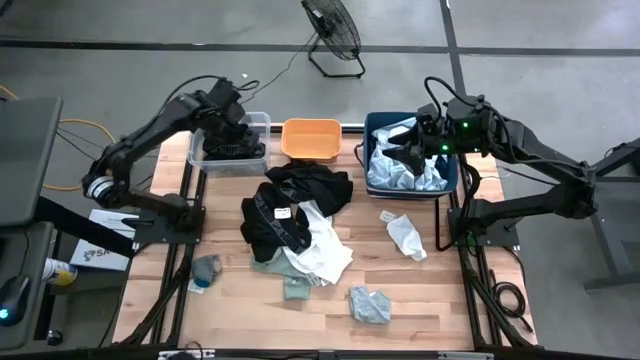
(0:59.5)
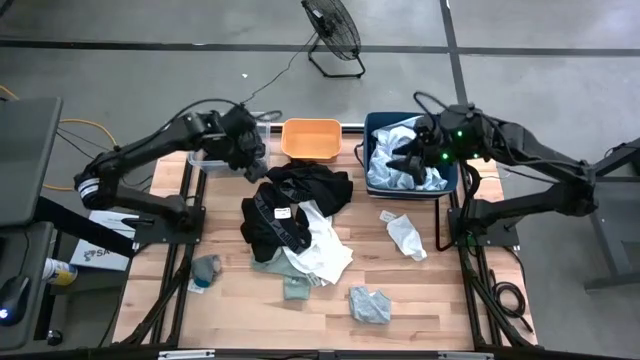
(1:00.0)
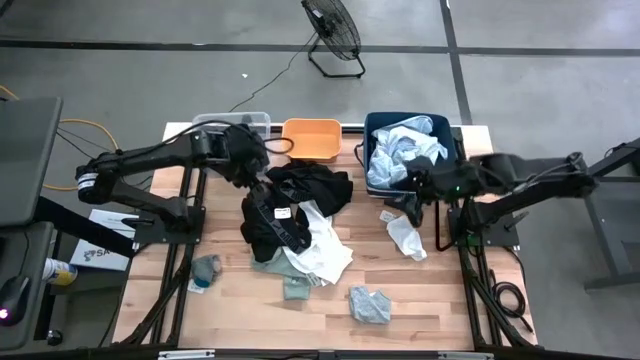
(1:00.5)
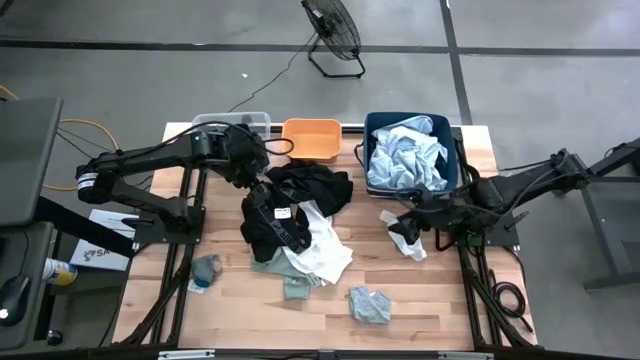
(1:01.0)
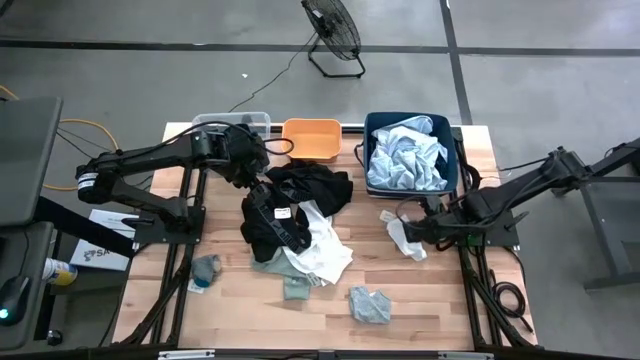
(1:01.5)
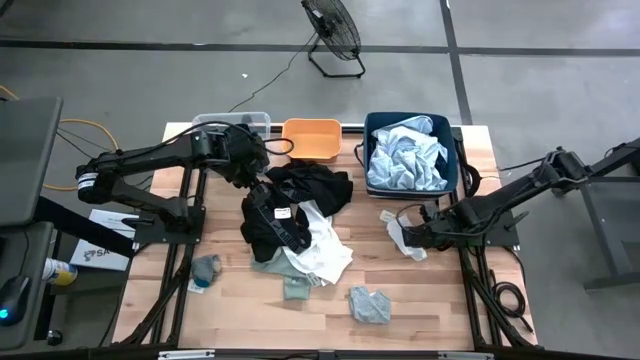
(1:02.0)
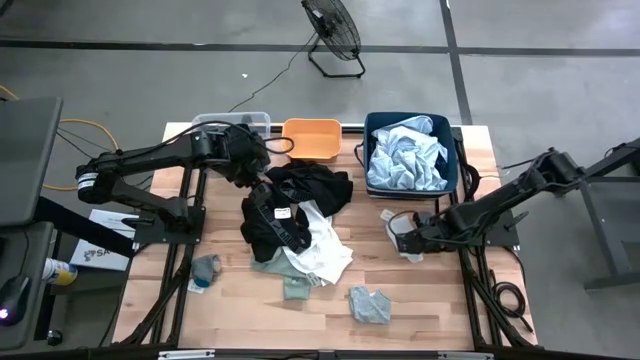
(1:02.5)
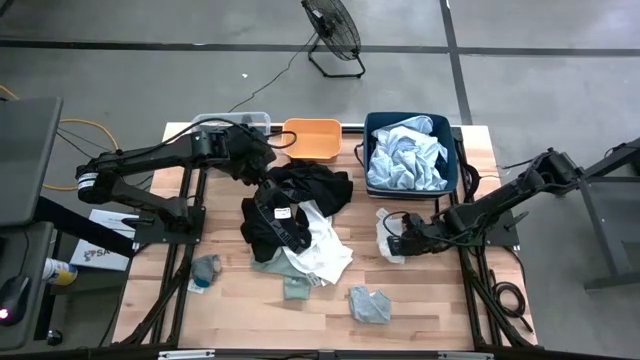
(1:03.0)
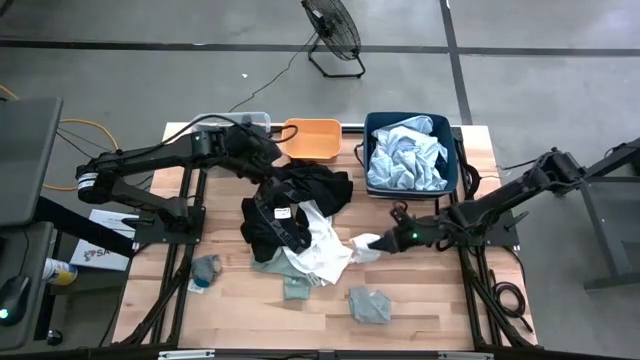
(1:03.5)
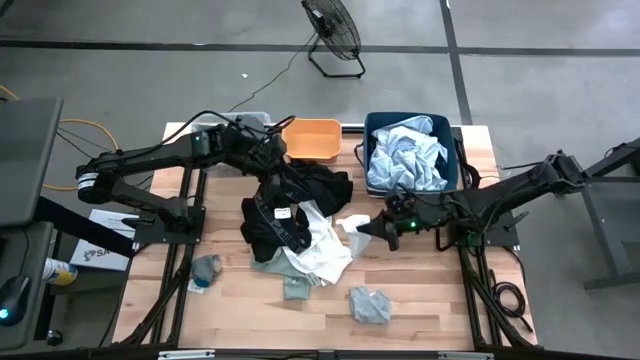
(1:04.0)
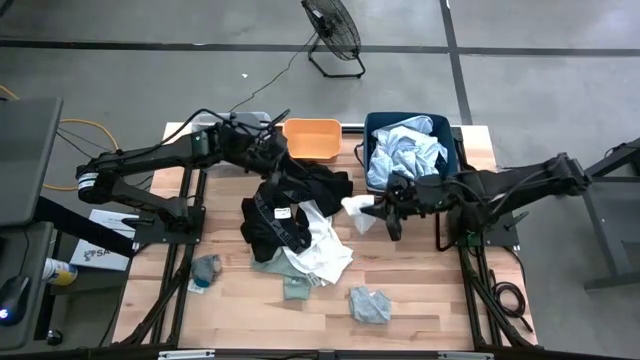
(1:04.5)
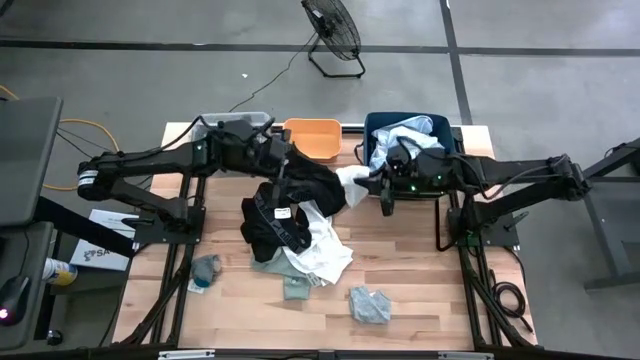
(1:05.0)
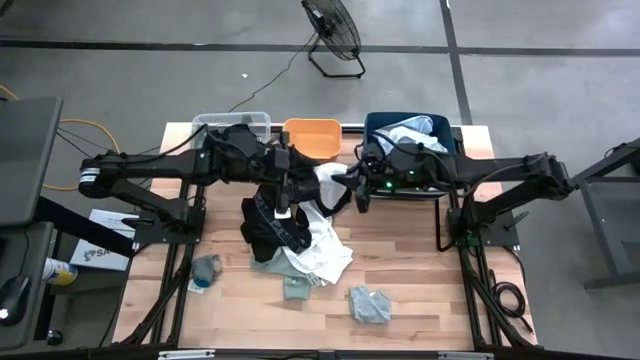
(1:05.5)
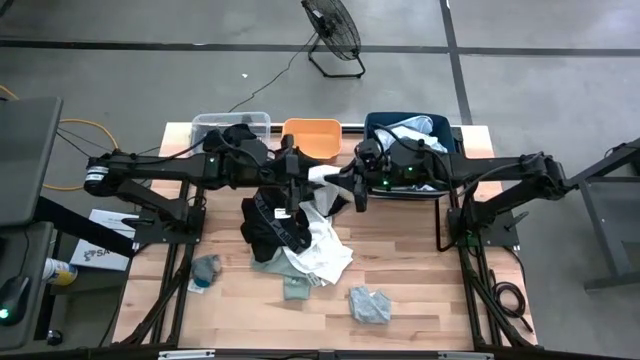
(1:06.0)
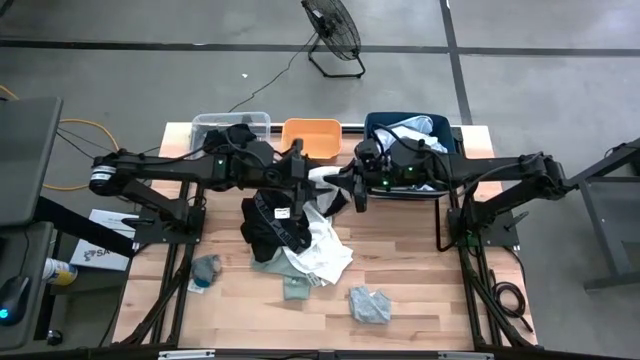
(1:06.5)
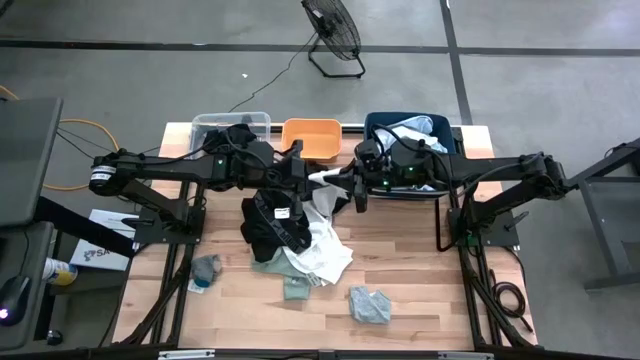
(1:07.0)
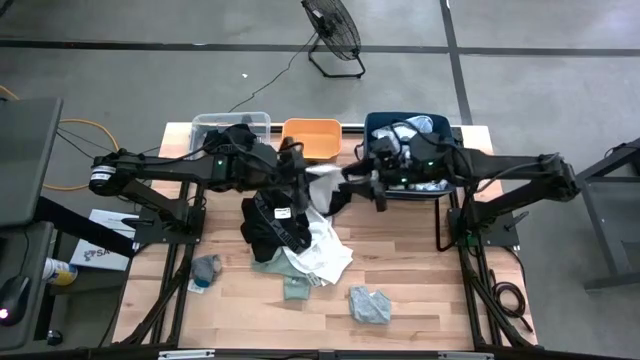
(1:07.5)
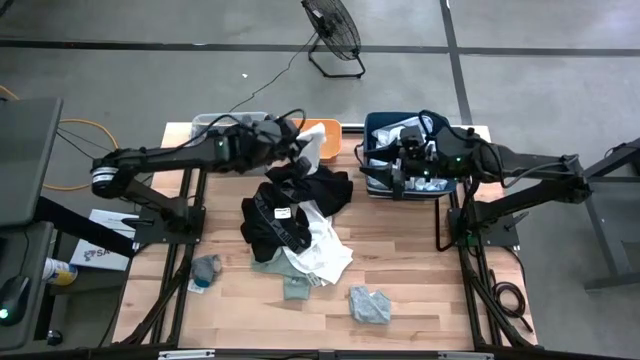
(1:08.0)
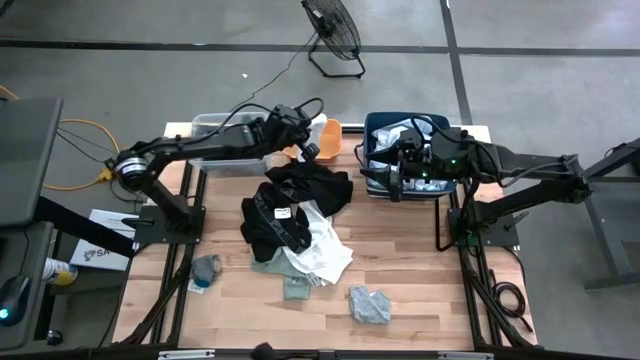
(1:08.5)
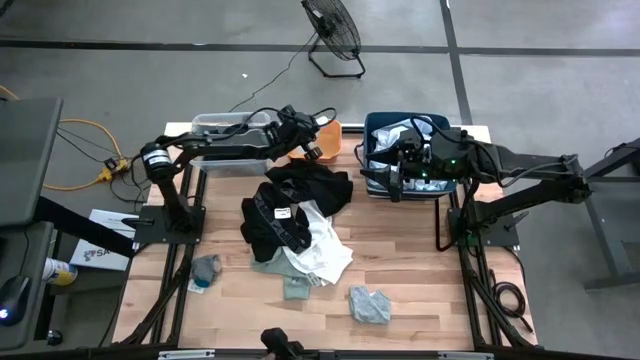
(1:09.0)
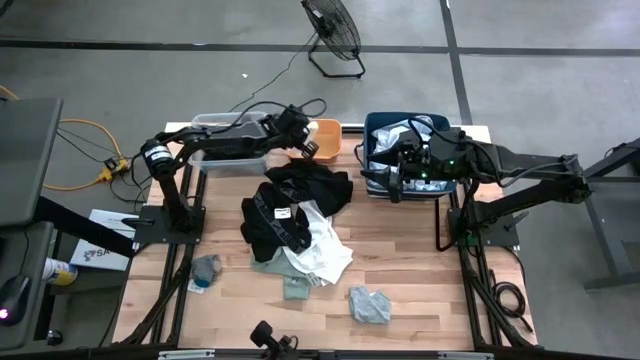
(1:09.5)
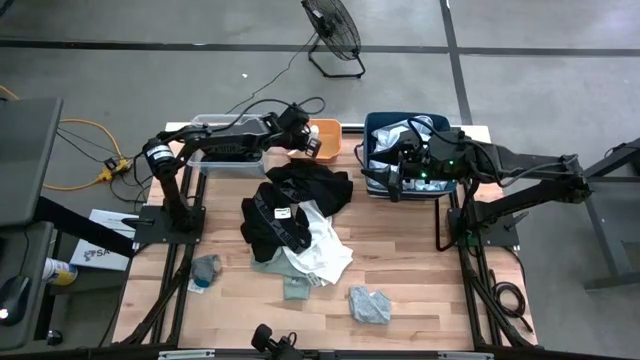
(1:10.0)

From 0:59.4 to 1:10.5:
Task: Pick & Place Cloths
Put the white sock into the yellow bin

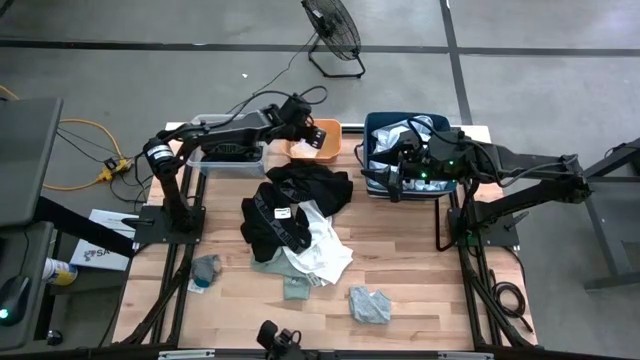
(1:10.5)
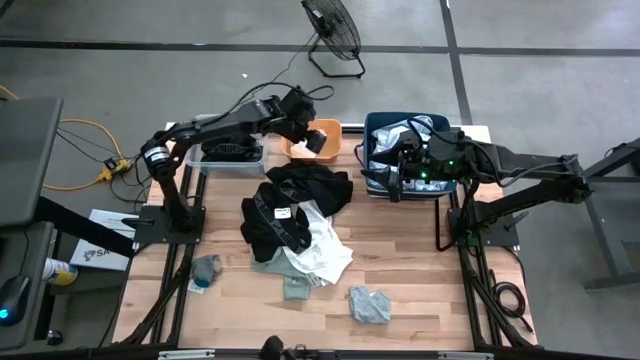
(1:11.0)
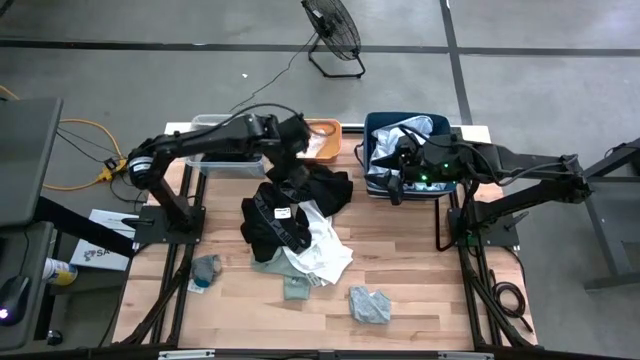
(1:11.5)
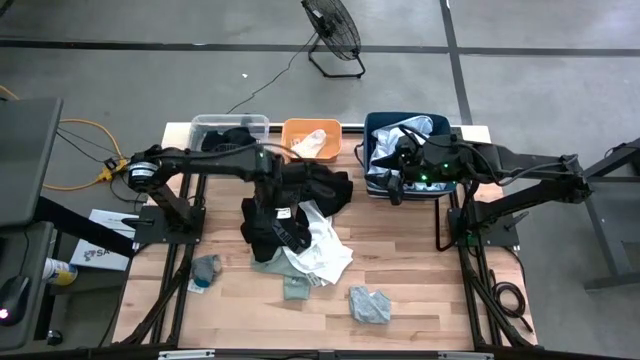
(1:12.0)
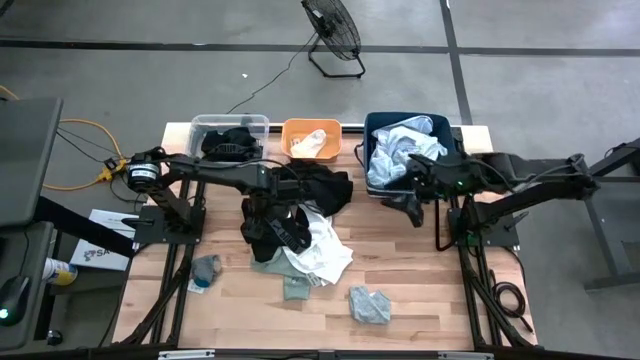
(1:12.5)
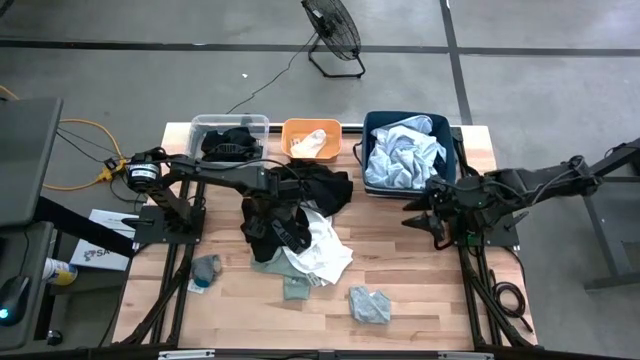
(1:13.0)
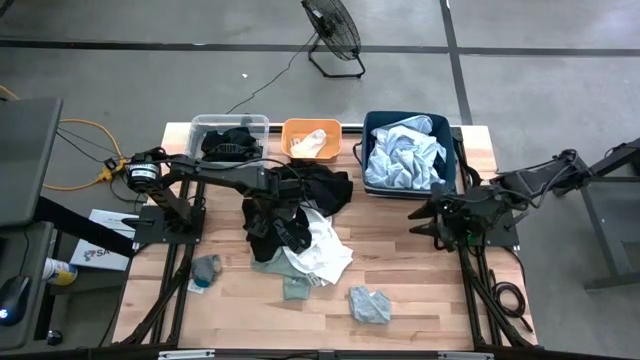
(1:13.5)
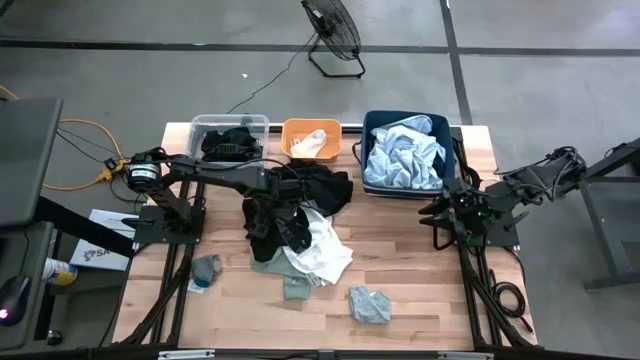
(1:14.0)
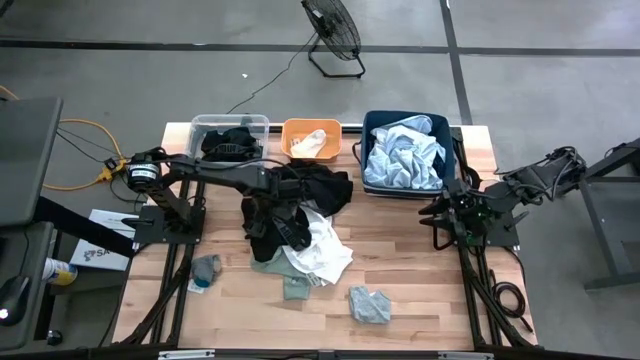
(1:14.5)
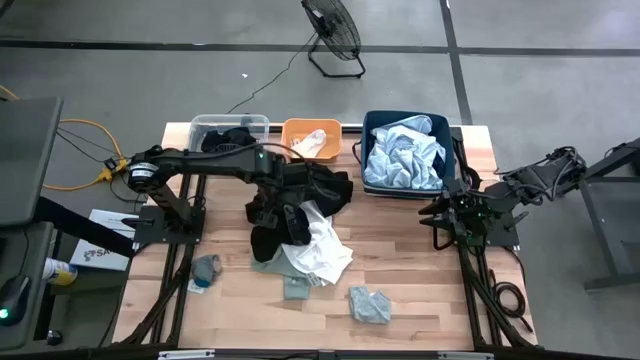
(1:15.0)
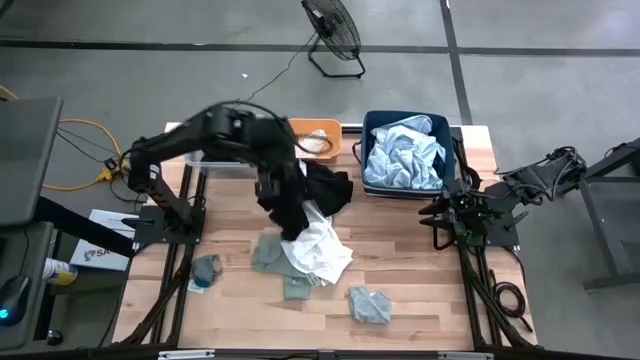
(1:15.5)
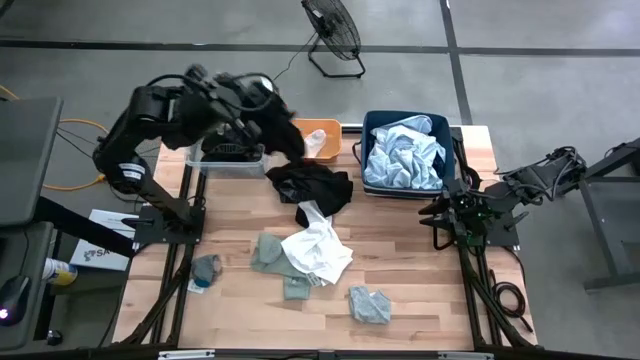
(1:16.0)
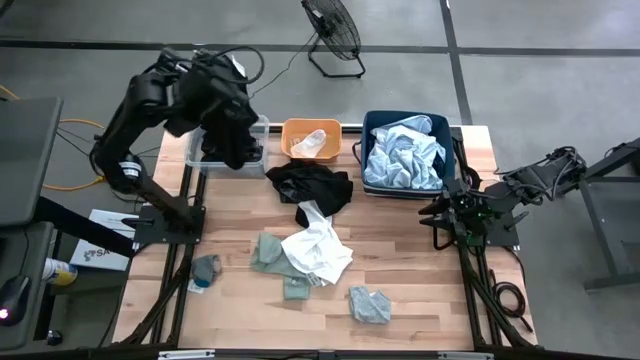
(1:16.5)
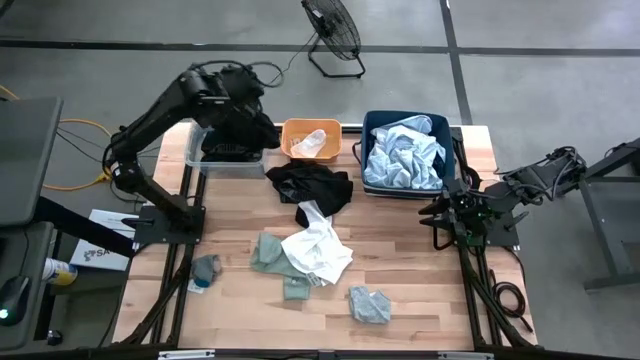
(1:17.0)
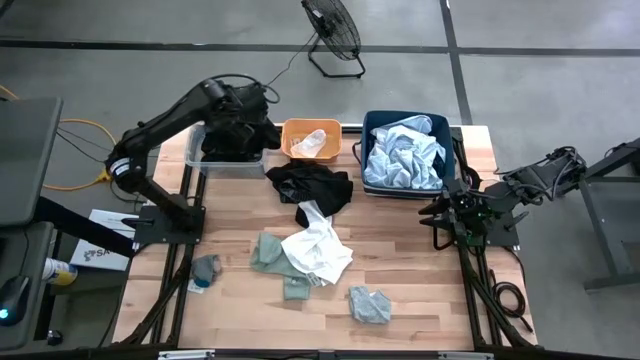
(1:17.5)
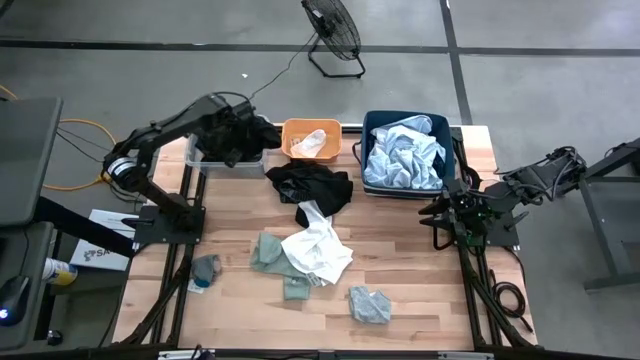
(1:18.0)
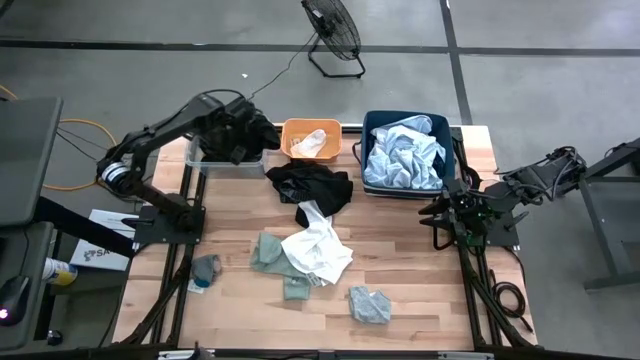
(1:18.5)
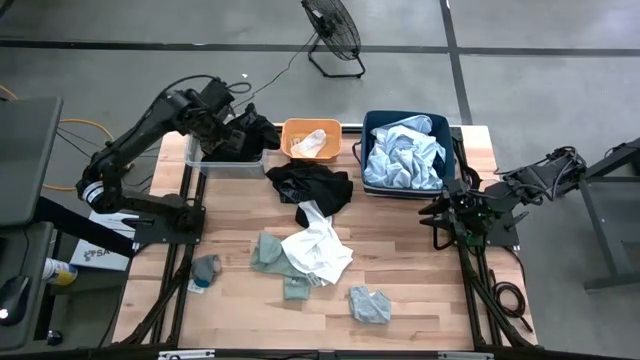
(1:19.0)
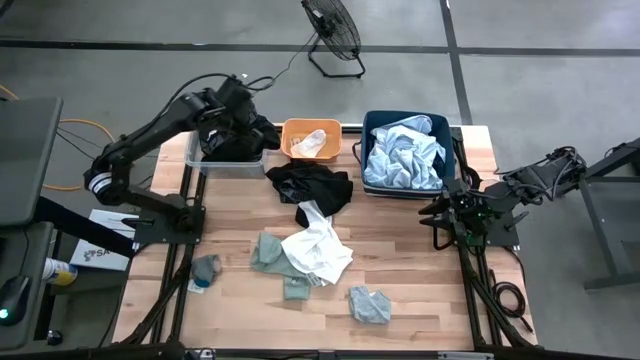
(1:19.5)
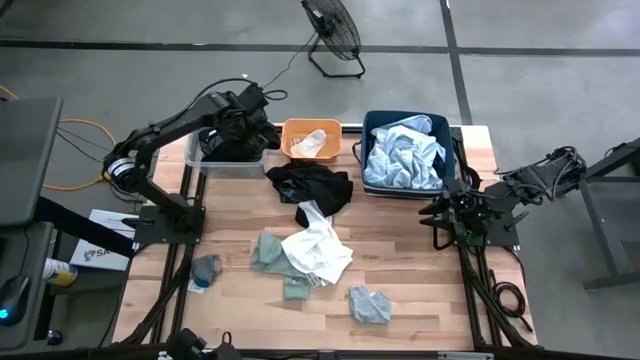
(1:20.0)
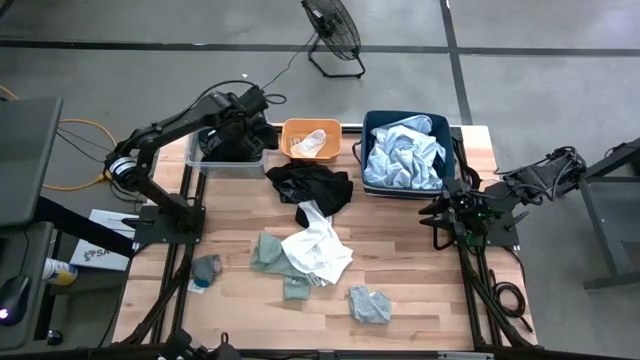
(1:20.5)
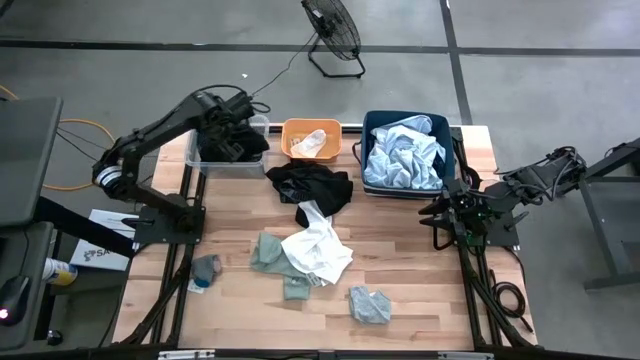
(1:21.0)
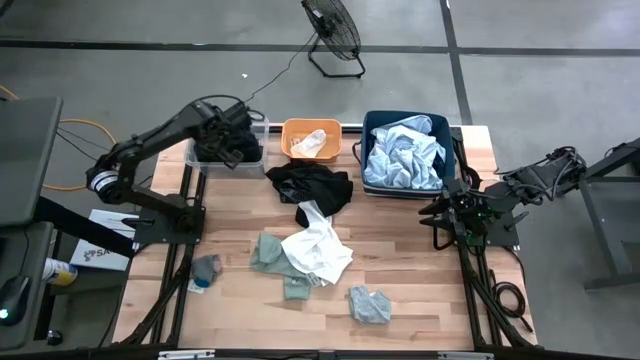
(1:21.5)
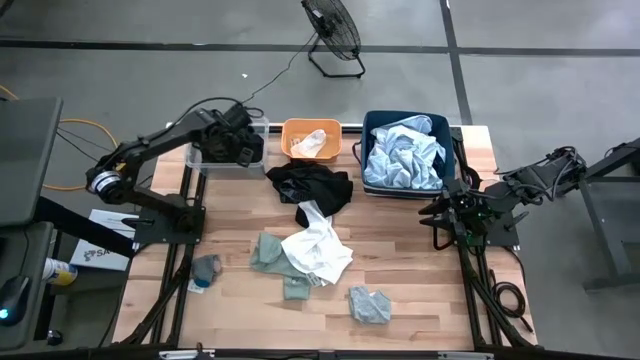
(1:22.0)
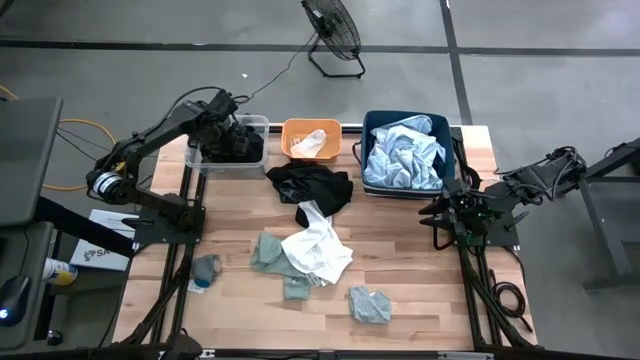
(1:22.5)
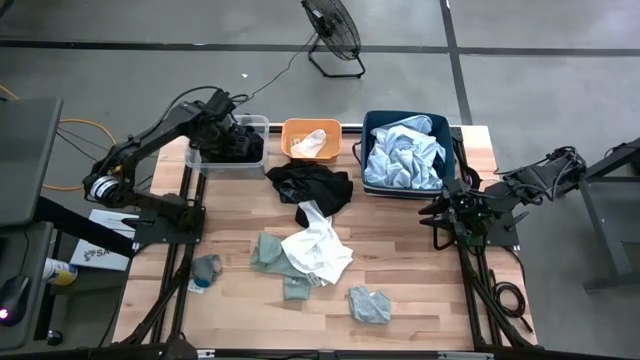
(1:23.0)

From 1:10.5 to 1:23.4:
Put the black underwear into the transparent bin
